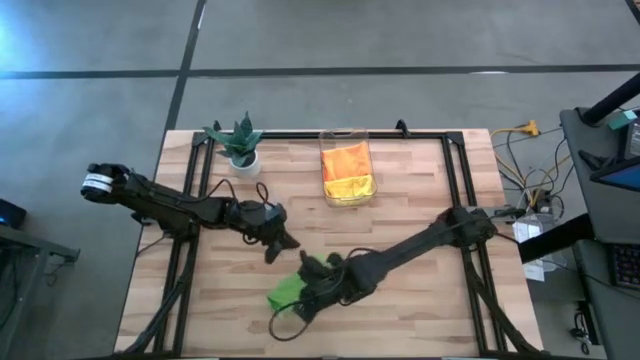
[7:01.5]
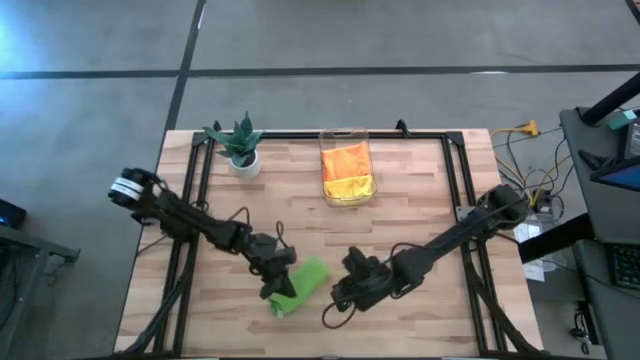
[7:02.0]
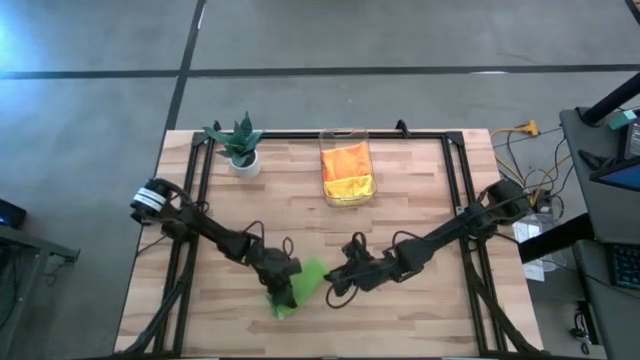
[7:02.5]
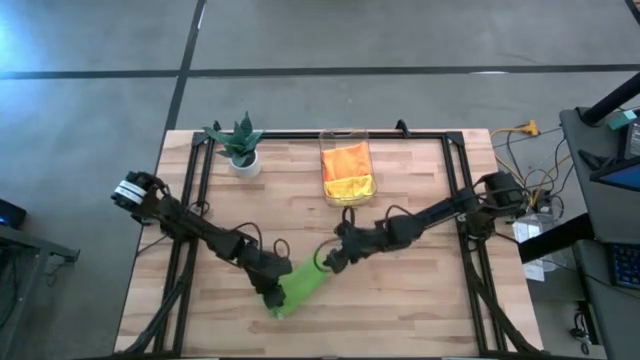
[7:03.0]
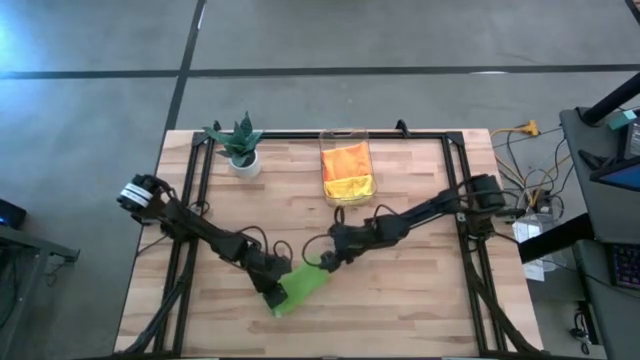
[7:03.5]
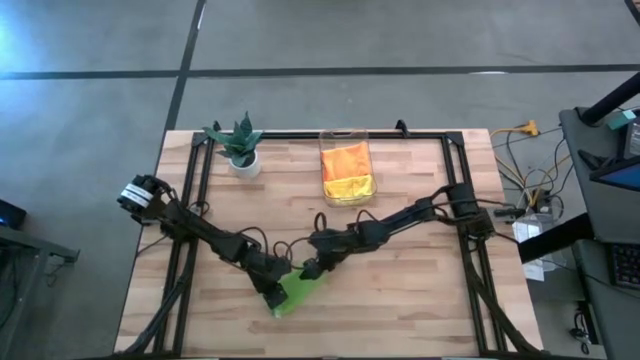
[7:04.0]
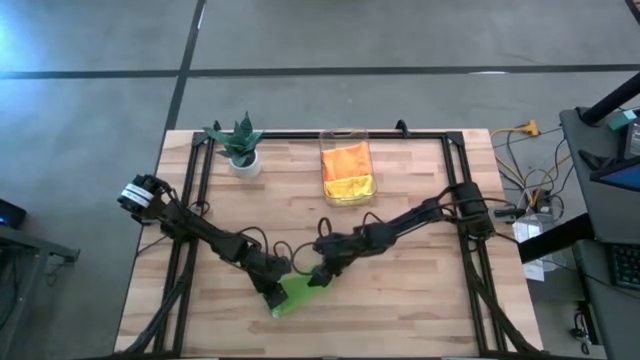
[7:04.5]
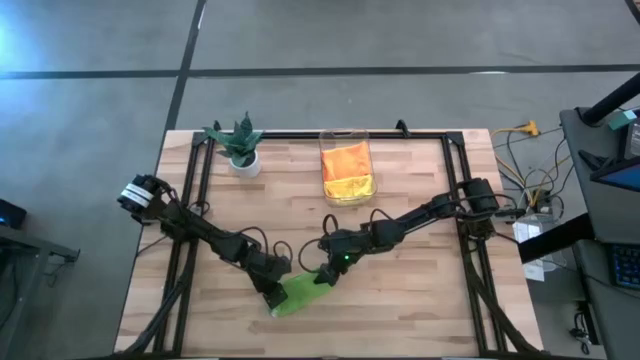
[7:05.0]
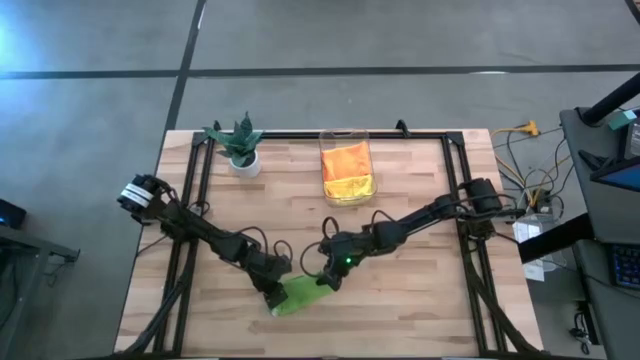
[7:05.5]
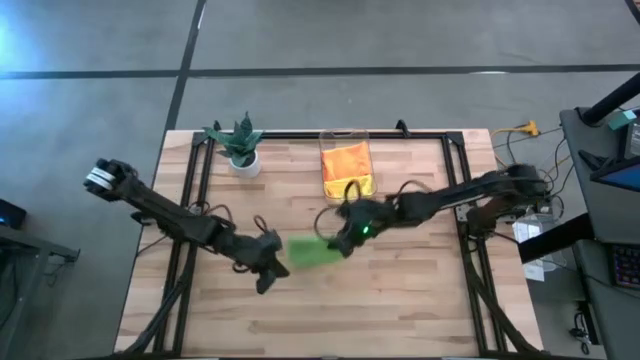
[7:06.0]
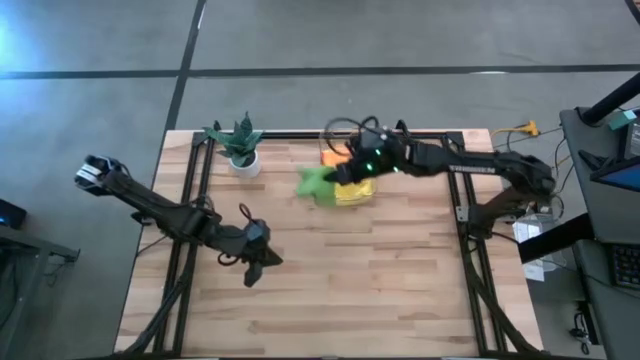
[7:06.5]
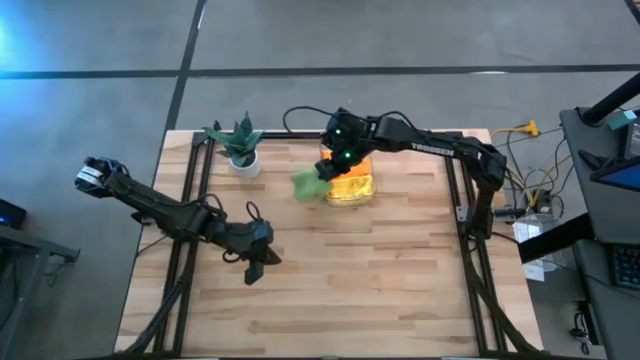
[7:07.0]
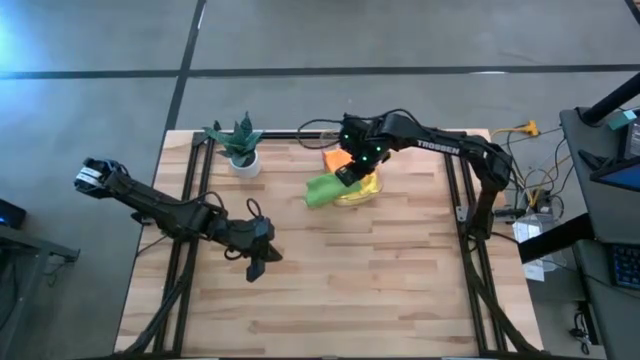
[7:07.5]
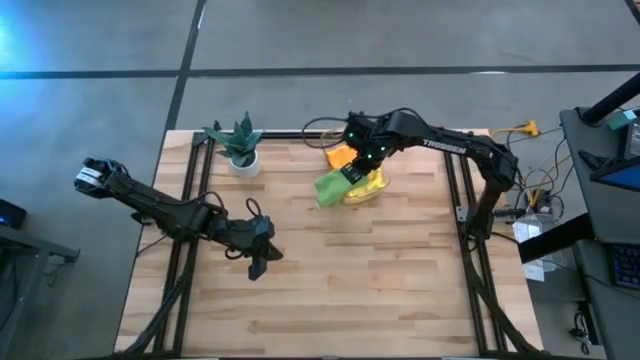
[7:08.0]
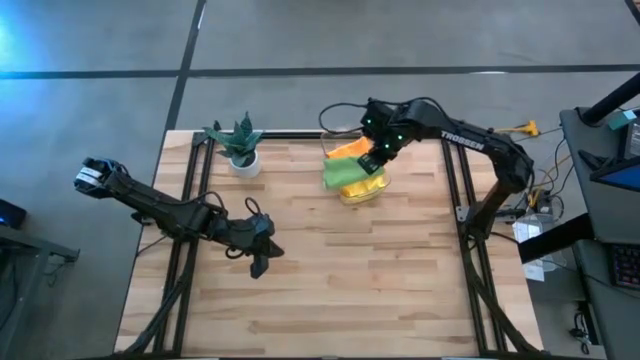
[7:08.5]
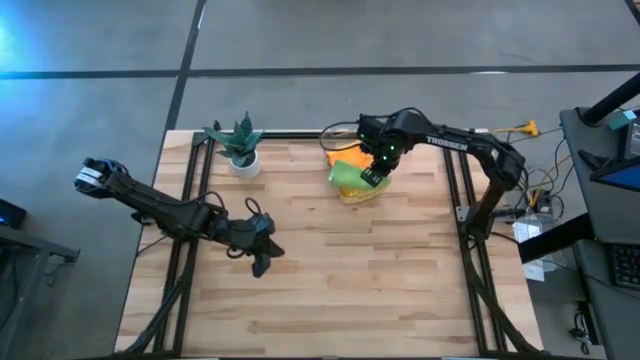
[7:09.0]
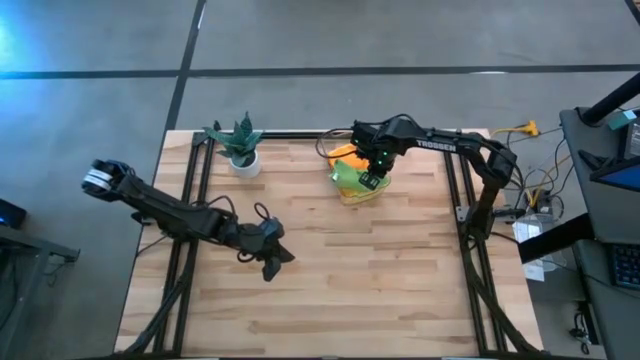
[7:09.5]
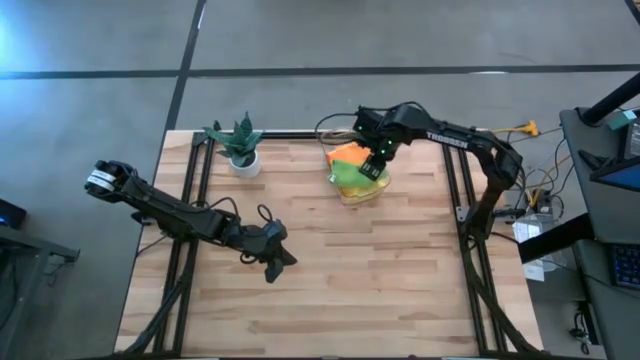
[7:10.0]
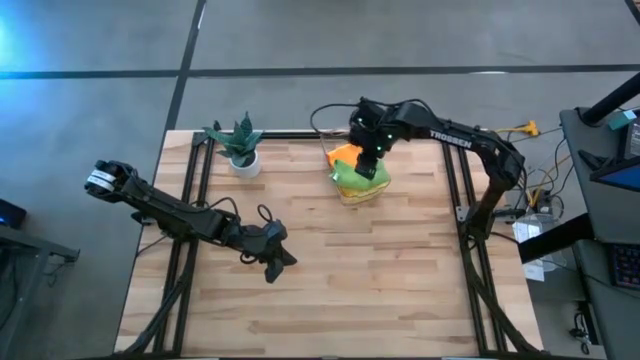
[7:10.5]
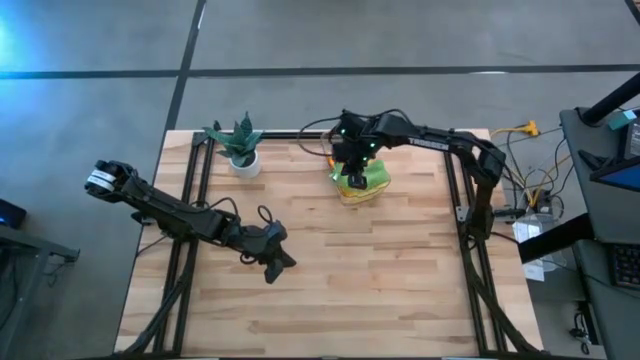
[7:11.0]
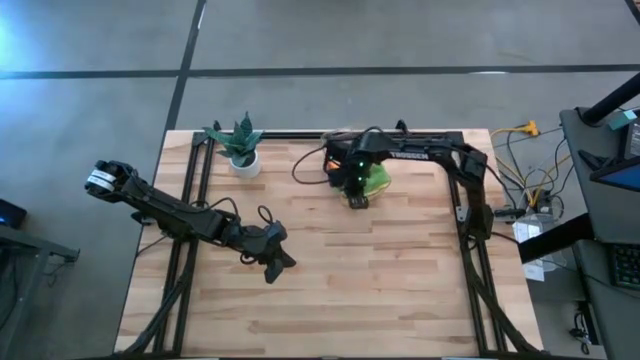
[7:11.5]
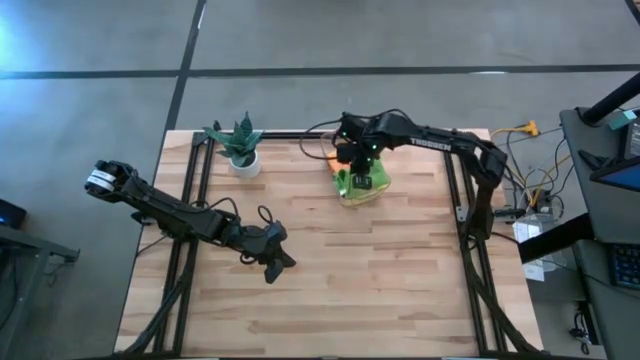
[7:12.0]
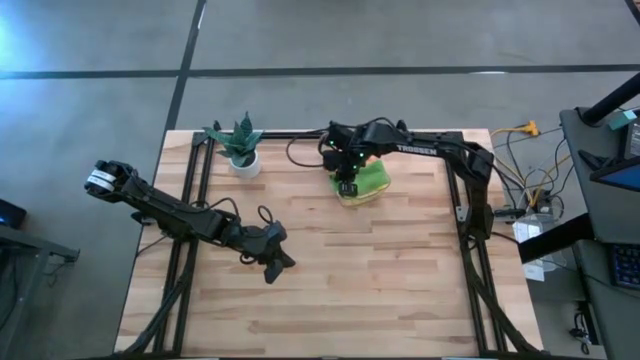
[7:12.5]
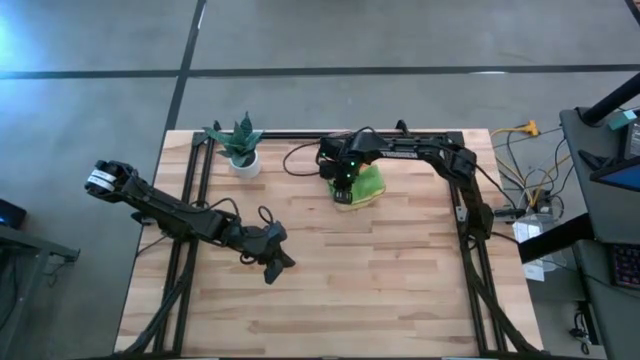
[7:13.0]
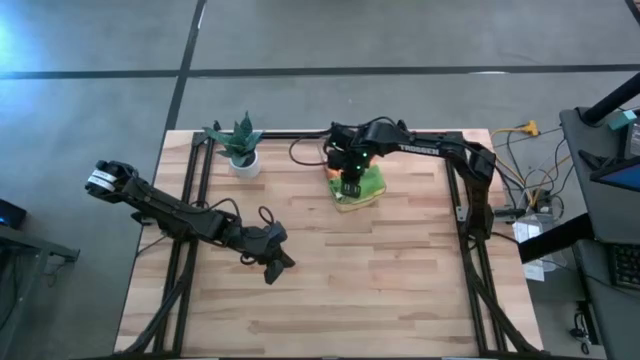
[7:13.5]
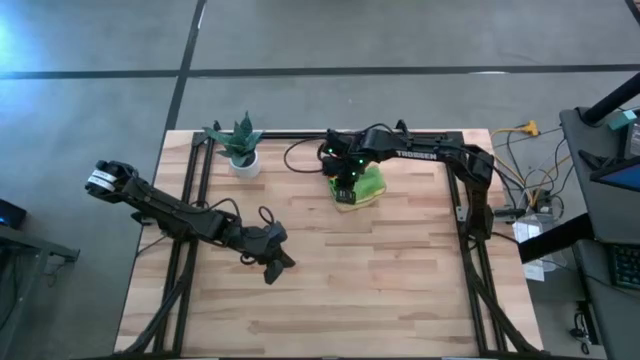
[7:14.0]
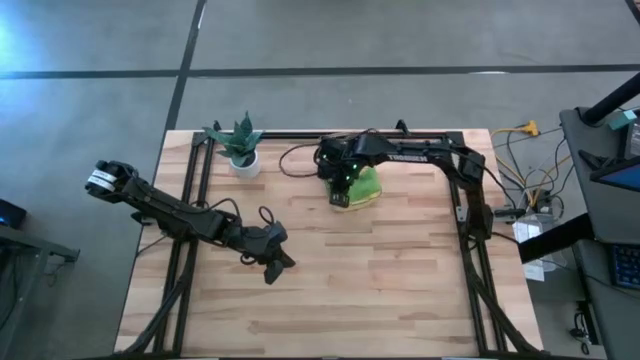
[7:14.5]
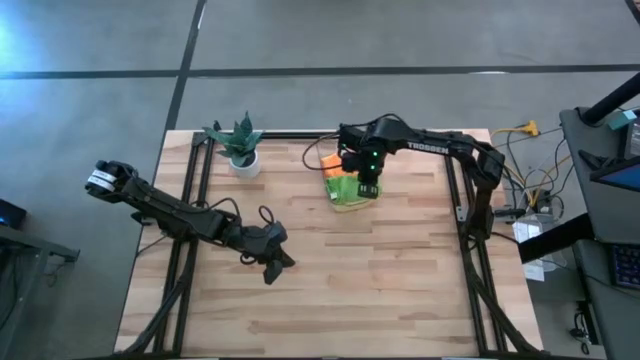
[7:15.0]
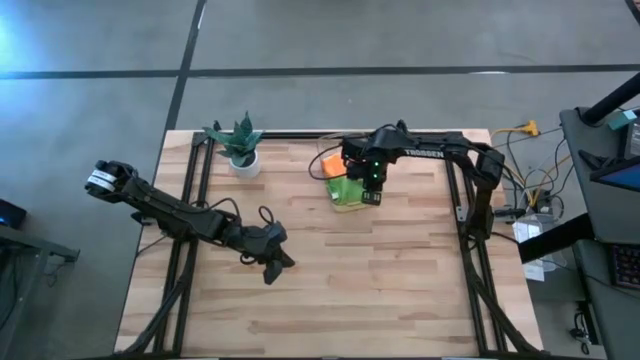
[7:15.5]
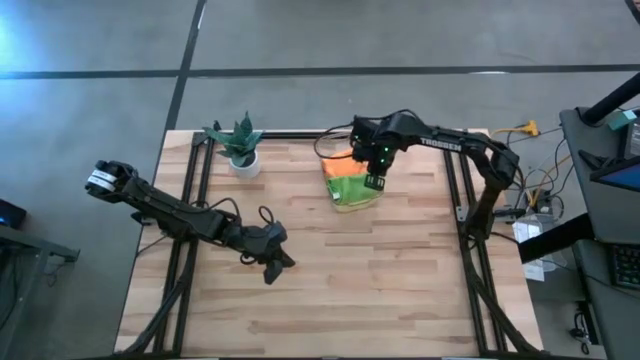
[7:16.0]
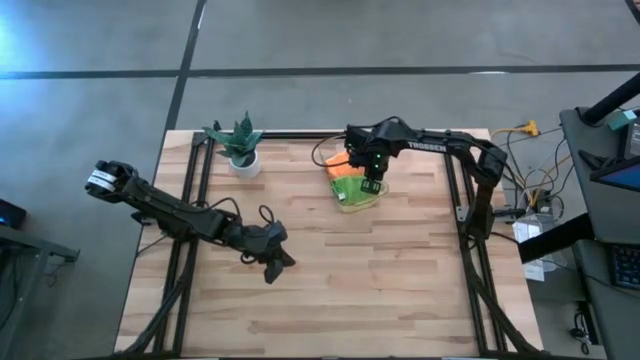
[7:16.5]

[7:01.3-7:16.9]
Task: Fold microfiber towels
Put the folded green towel into the transparent bin

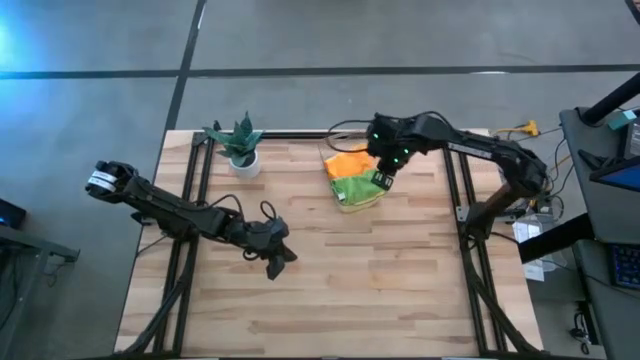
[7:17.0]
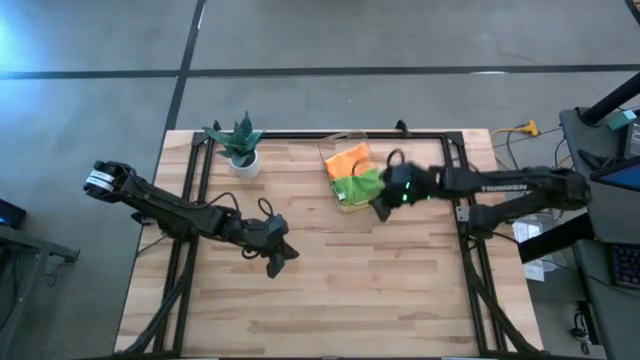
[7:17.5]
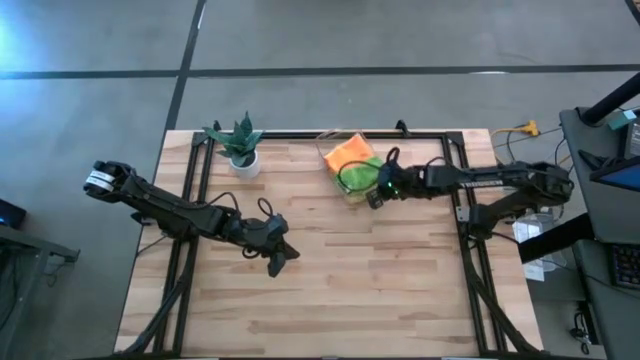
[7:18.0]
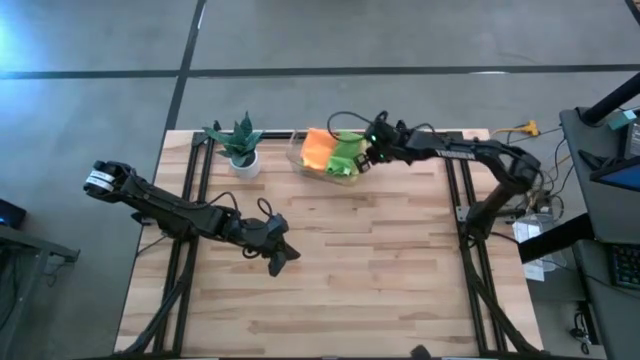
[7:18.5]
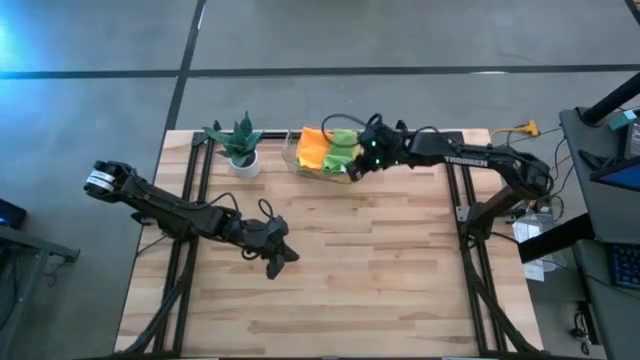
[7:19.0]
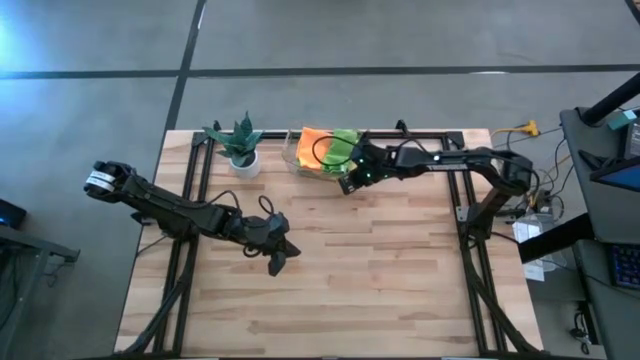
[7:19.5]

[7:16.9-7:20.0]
Adjust the transparent bin

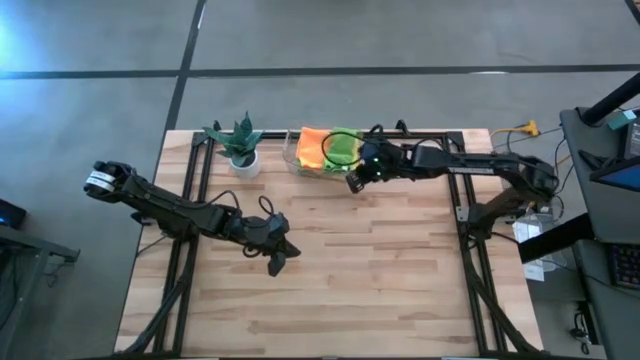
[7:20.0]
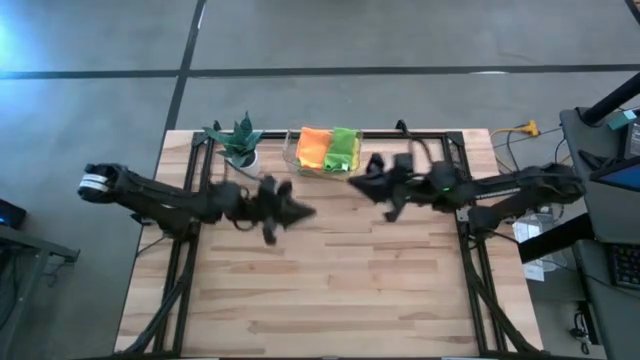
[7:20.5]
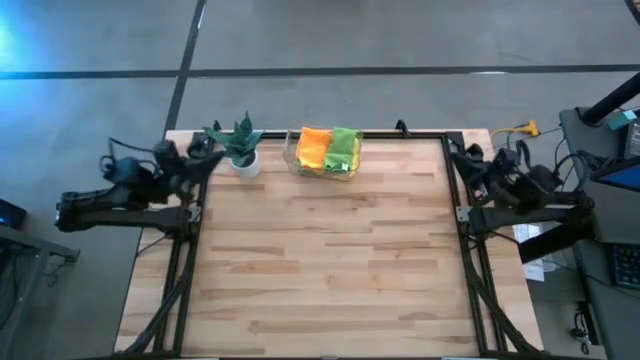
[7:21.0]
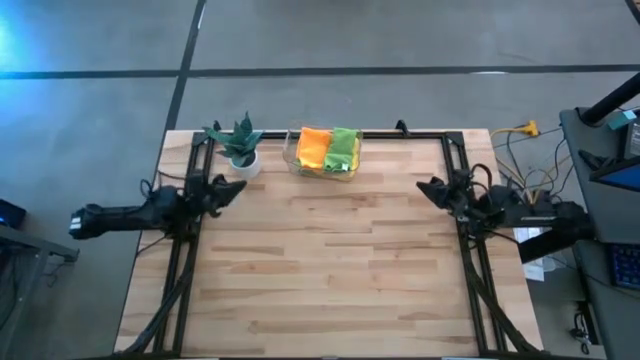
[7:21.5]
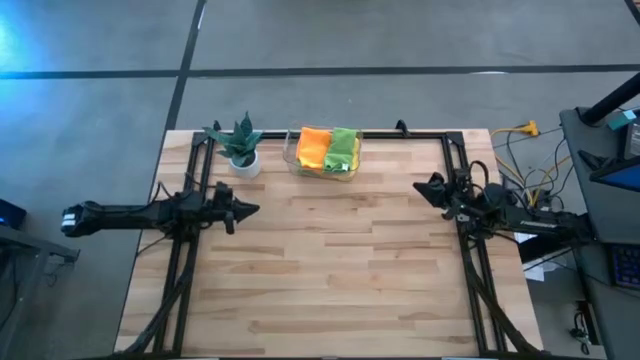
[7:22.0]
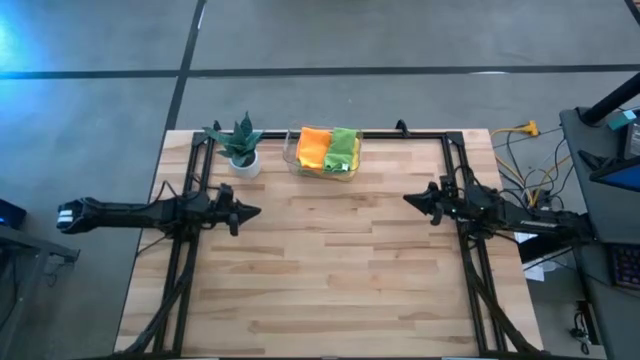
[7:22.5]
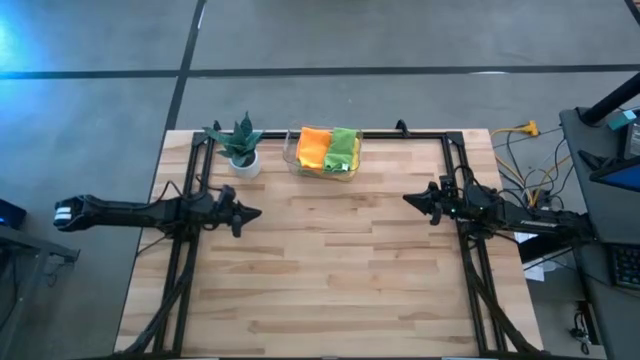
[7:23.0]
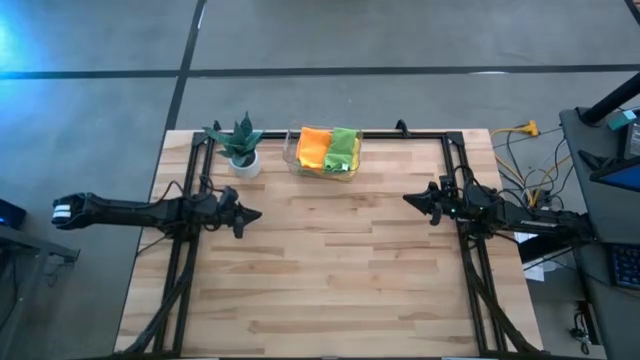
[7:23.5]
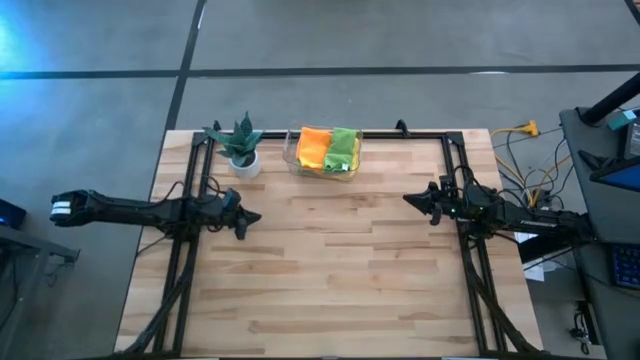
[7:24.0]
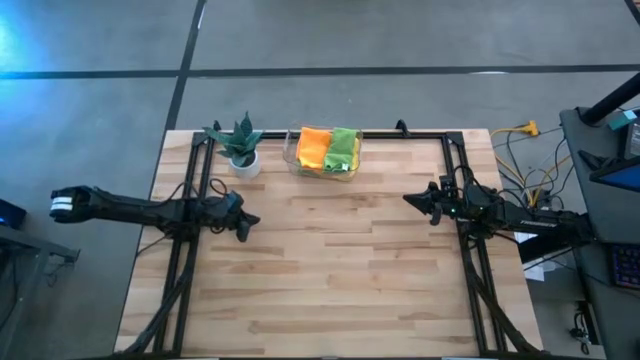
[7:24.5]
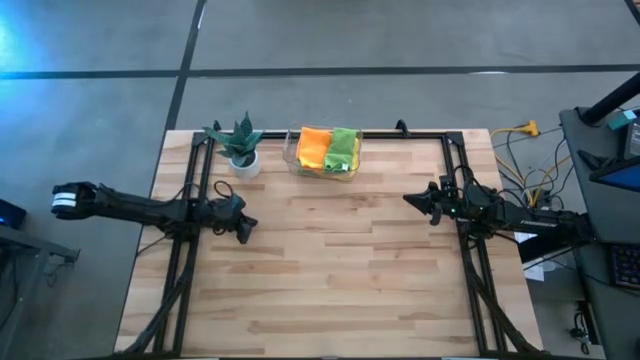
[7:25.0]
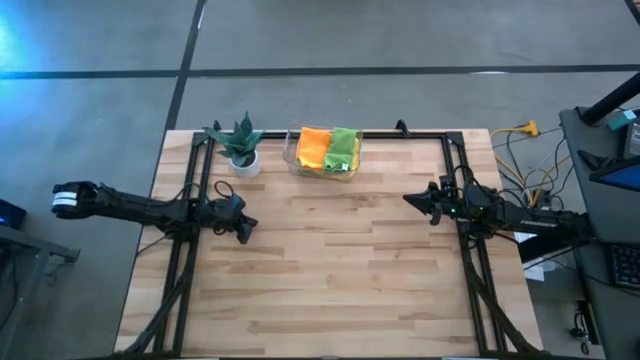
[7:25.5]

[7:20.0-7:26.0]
Return to Home Position
